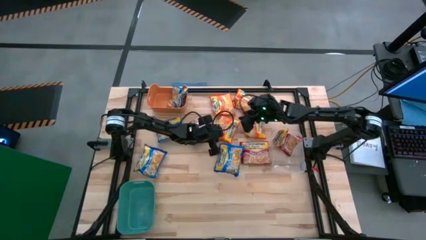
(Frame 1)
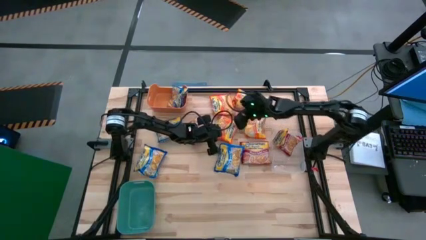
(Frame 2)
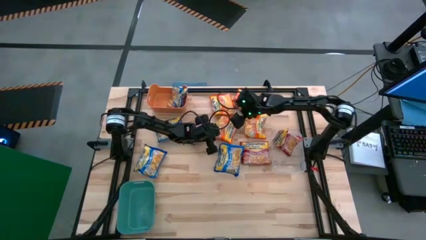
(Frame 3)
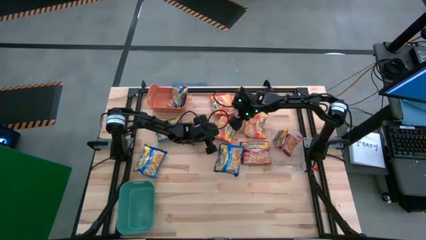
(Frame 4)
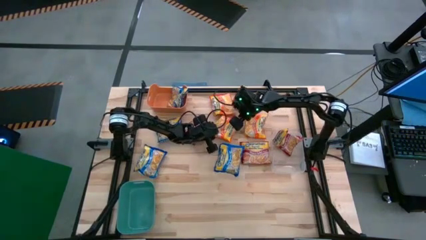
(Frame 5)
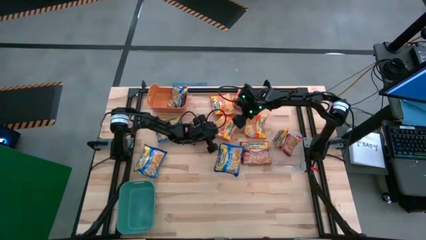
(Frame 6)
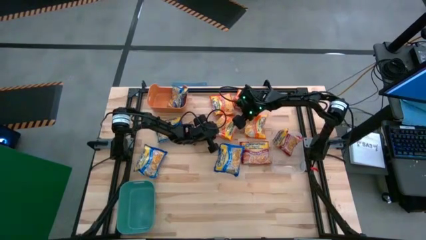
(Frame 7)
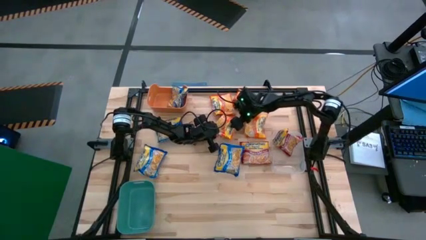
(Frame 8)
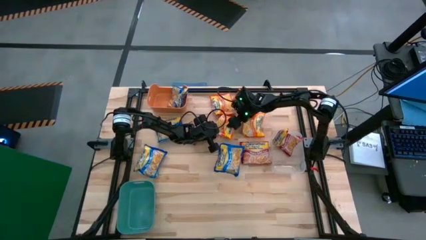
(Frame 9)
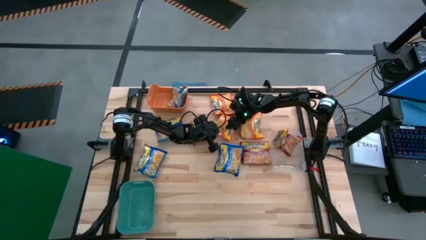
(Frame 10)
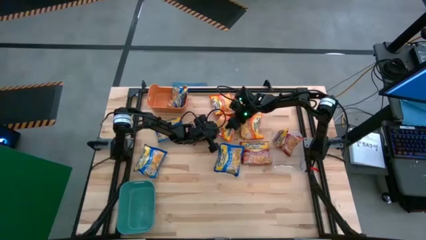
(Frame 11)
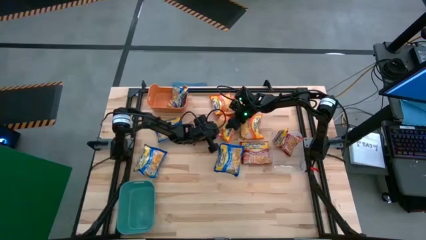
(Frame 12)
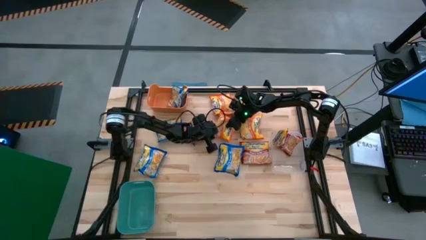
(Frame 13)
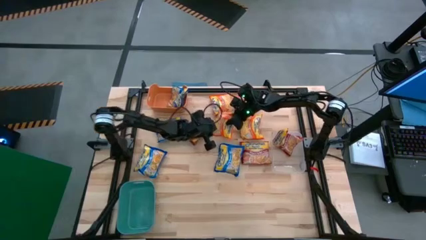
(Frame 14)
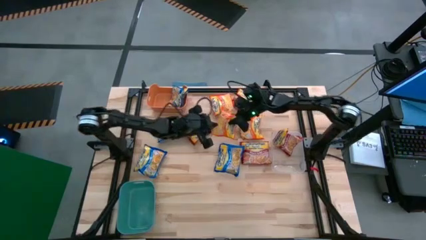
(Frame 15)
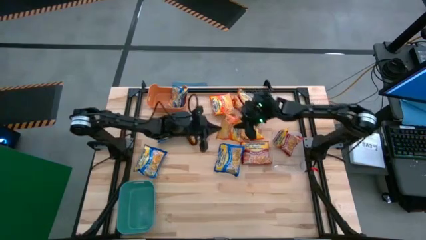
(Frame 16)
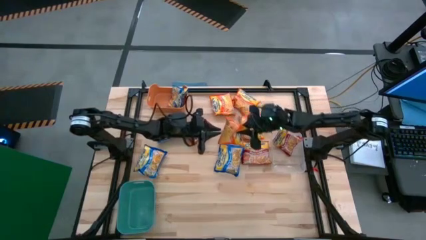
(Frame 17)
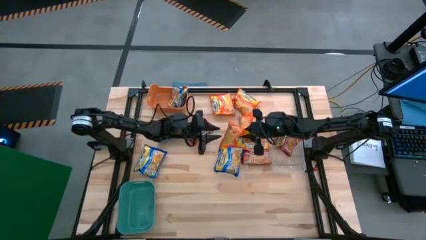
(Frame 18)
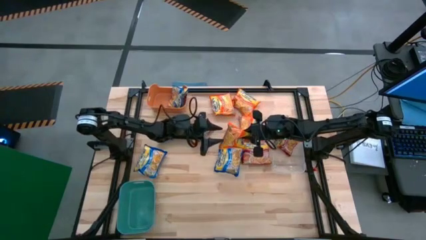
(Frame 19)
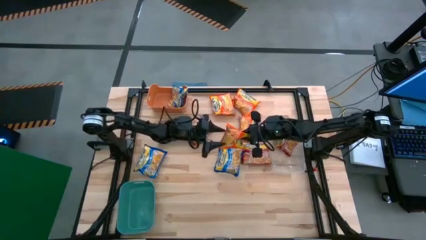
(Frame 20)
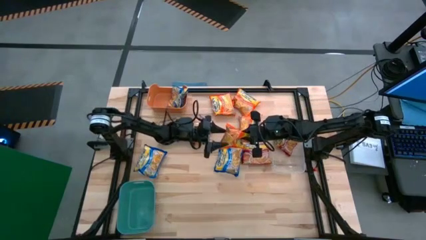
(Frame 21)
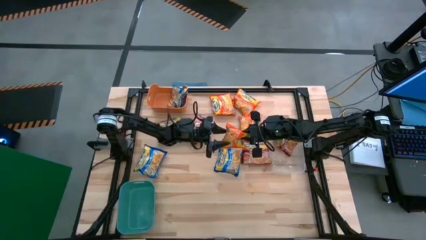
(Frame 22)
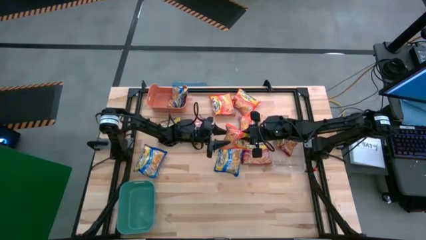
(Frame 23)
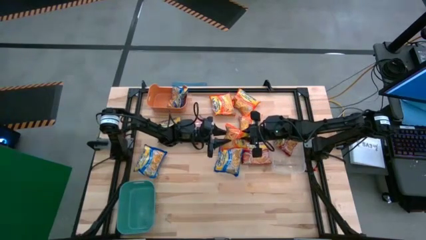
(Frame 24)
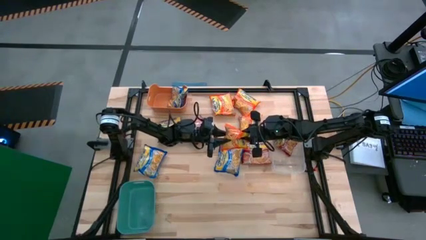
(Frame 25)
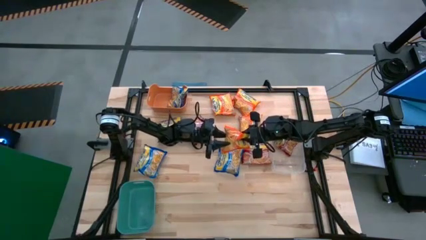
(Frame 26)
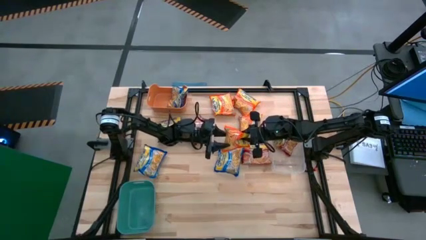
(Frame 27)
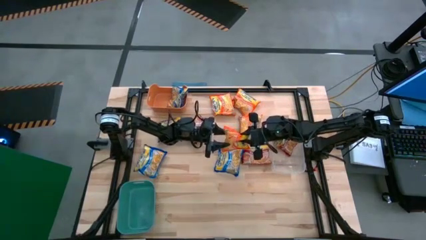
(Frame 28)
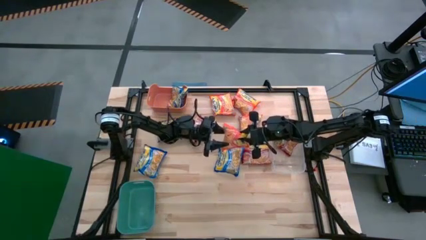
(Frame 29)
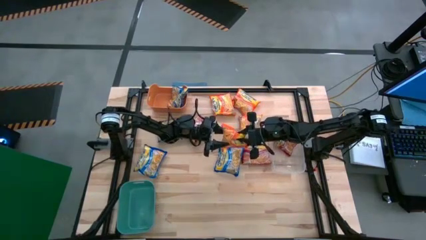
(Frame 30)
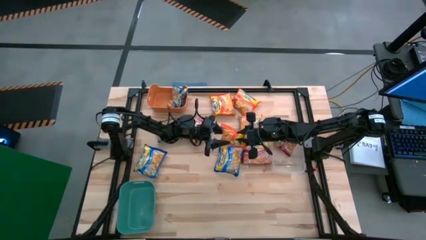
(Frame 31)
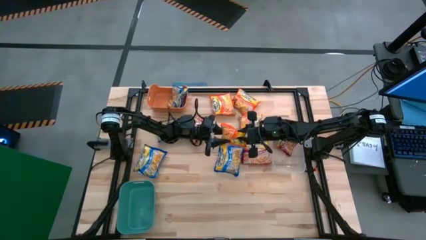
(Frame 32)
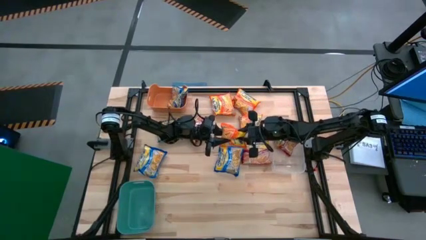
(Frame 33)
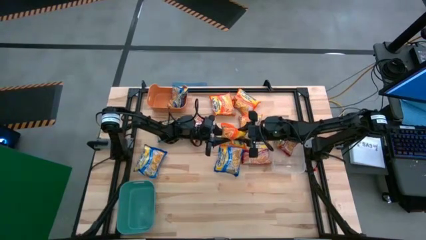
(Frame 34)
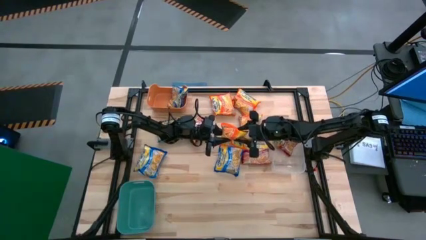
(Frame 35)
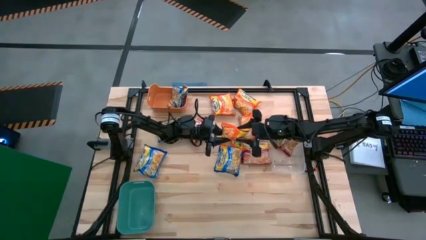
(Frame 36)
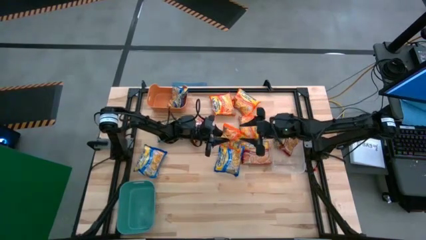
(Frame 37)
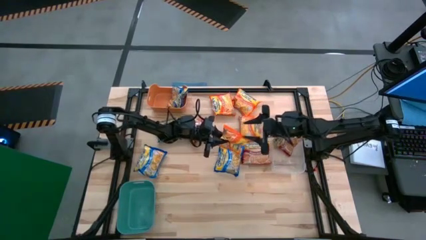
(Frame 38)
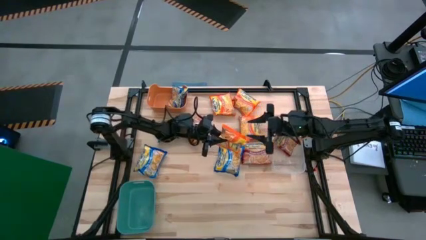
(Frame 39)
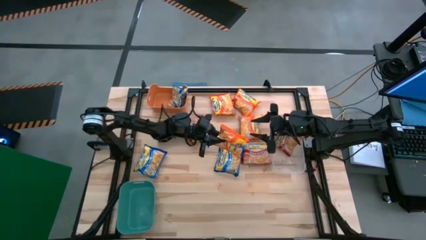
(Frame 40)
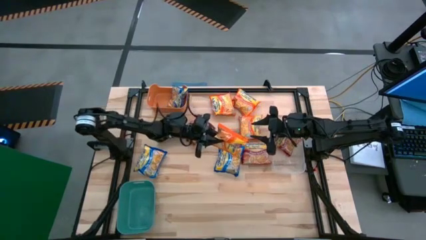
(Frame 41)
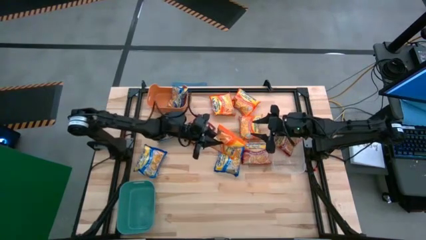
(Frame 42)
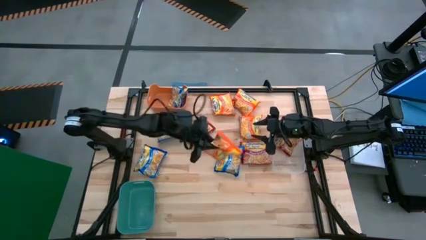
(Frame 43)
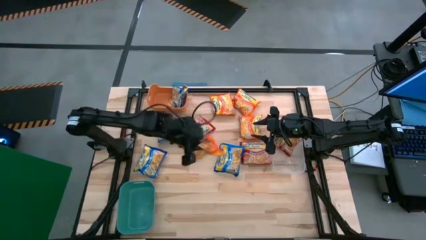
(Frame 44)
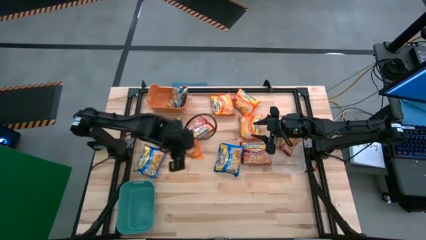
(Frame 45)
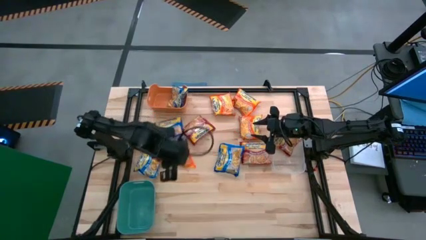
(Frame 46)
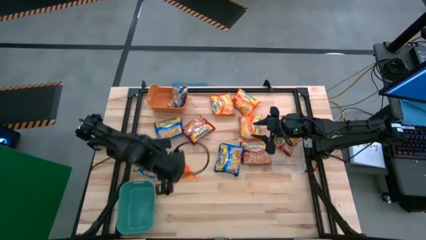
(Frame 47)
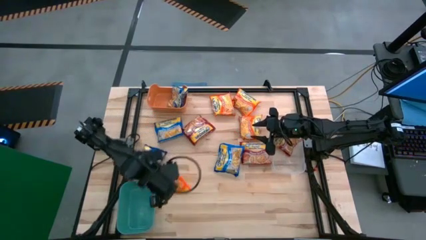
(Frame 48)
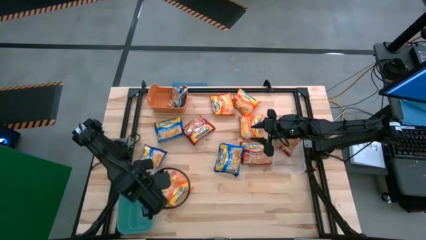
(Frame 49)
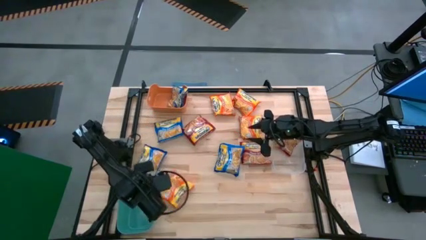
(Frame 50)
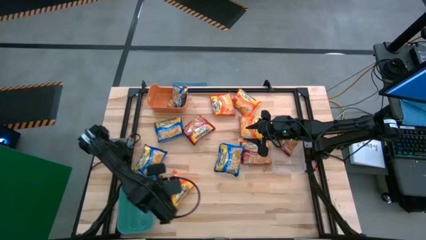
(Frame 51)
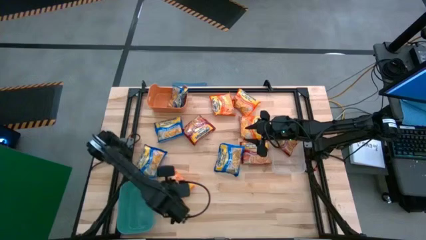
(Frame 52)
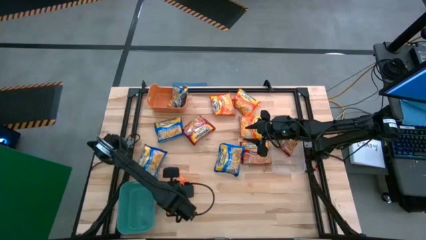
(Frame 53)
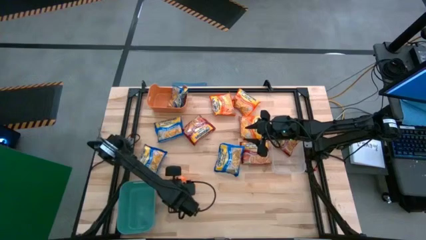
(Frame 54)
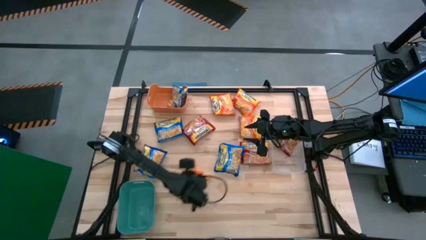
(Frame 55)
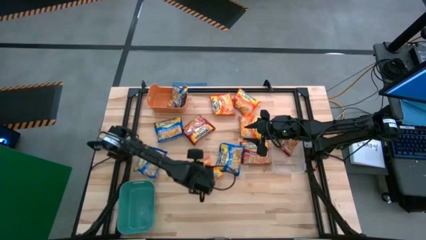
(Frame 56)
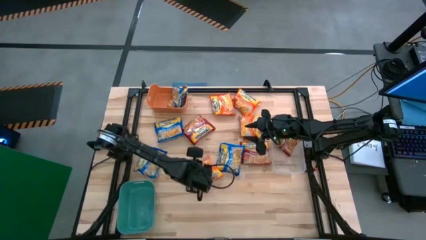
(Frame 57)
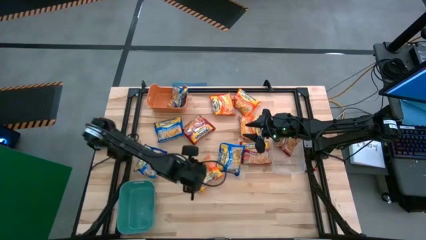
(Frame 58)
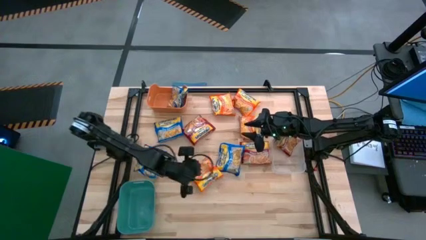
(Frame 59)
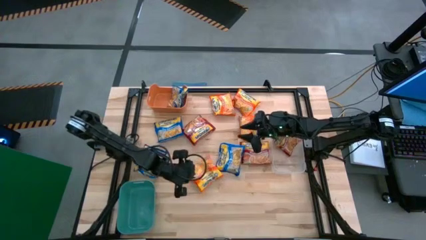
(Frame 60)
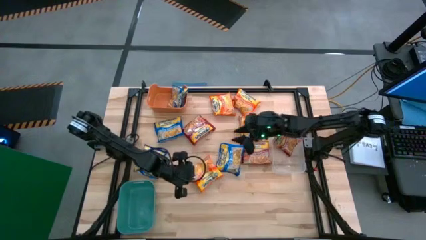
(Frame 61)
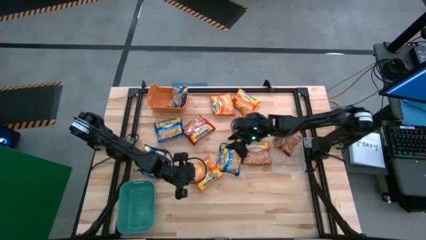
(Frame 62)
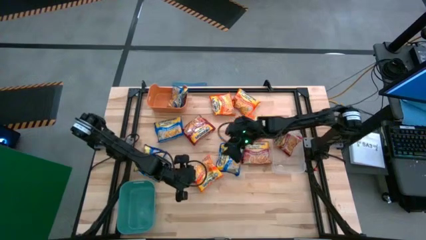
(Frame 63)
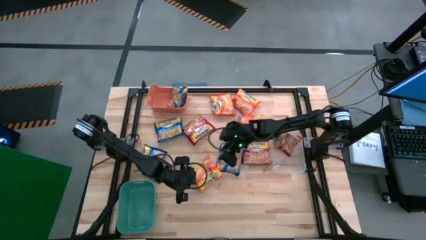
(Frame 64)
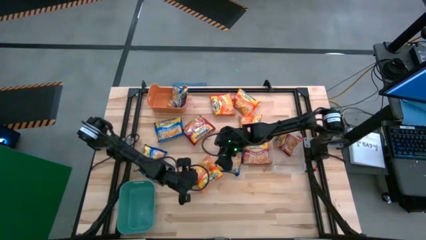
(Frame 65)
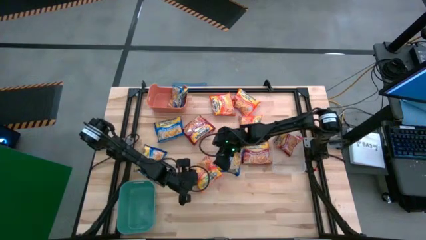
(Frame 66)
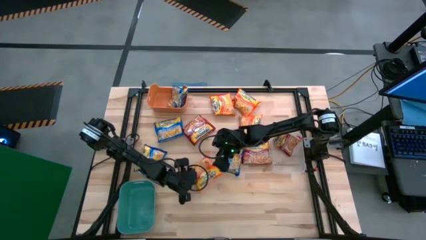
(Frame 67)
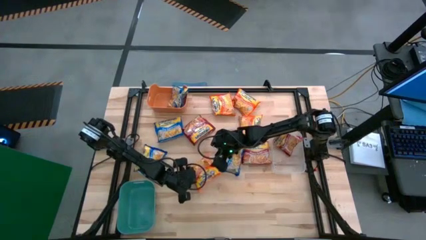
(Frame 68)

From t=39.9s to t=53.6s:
Task: Sort Maruchan noodles
Put the orange noodle pack into the green bin

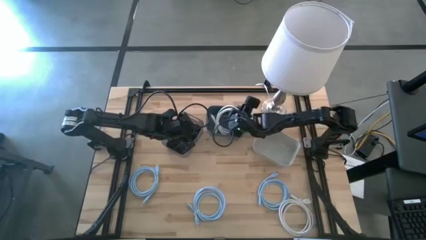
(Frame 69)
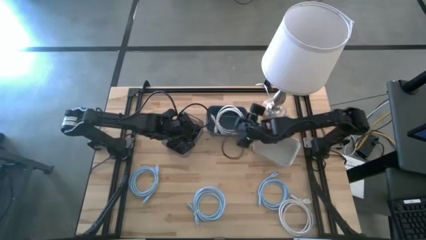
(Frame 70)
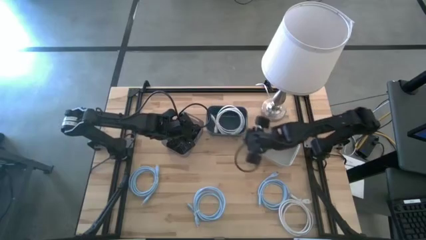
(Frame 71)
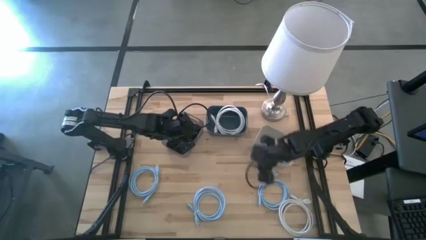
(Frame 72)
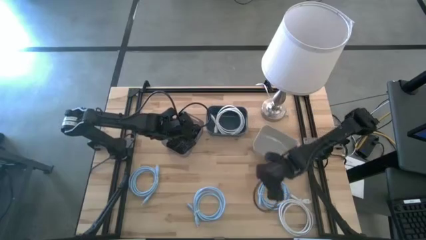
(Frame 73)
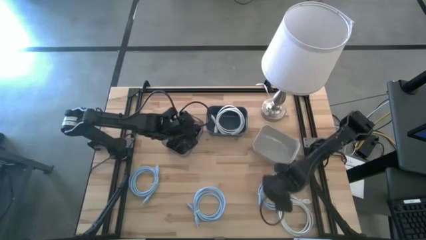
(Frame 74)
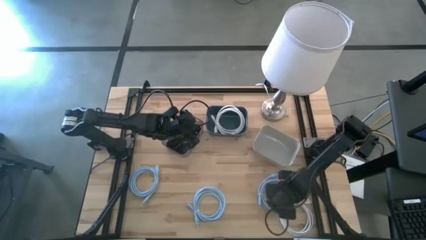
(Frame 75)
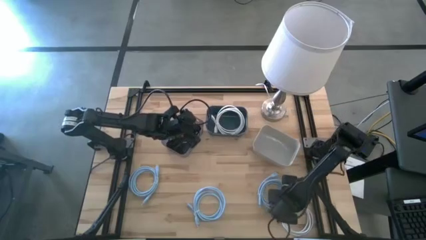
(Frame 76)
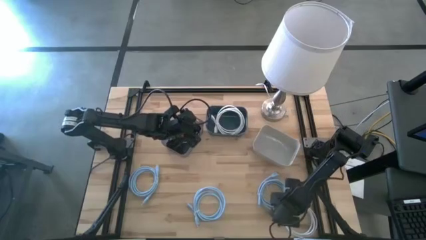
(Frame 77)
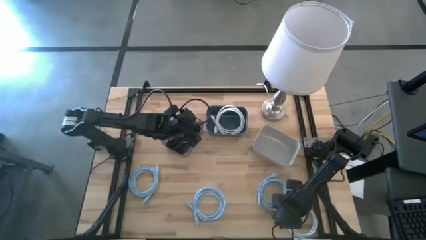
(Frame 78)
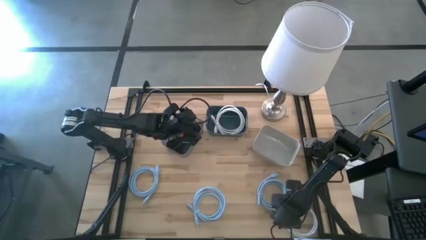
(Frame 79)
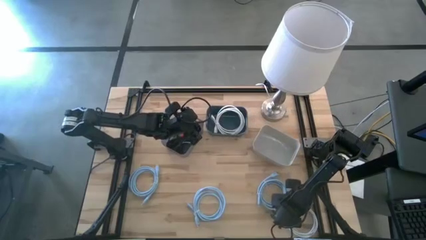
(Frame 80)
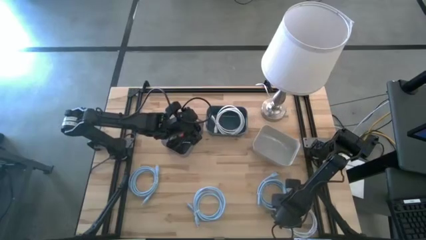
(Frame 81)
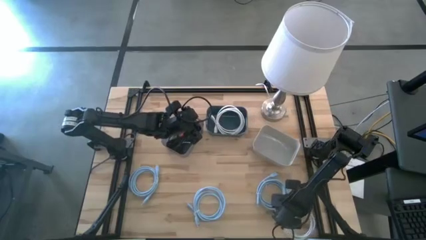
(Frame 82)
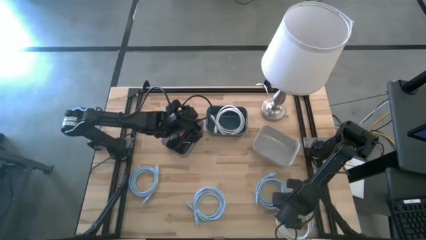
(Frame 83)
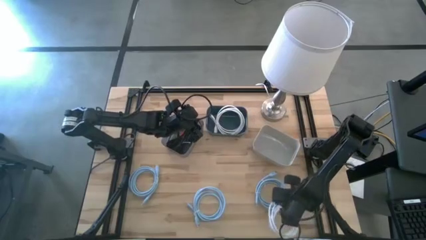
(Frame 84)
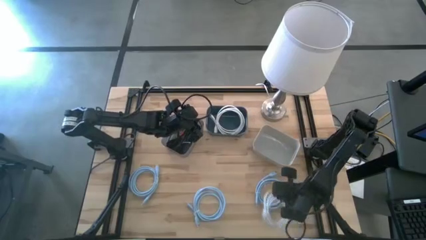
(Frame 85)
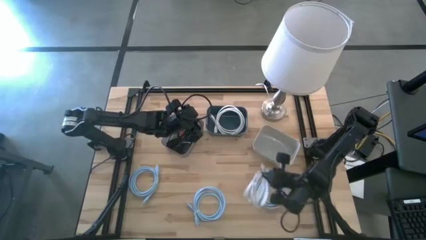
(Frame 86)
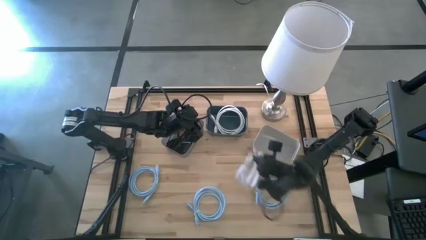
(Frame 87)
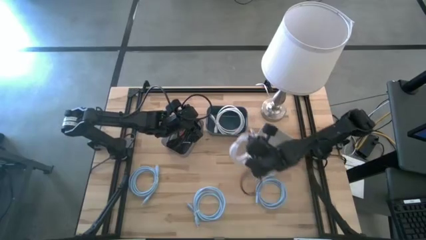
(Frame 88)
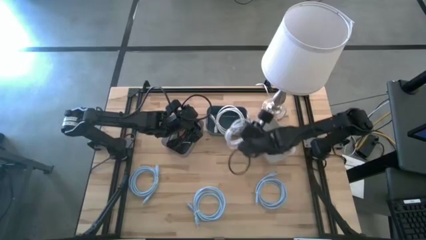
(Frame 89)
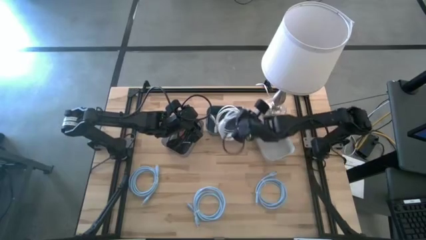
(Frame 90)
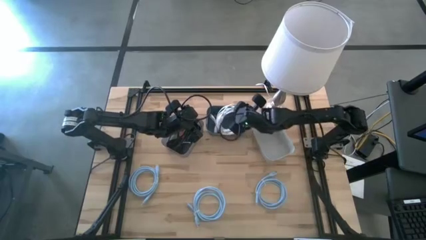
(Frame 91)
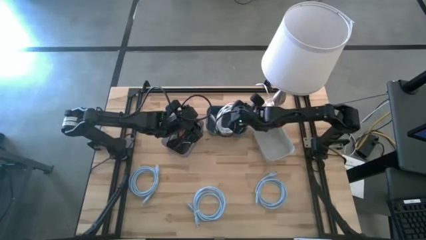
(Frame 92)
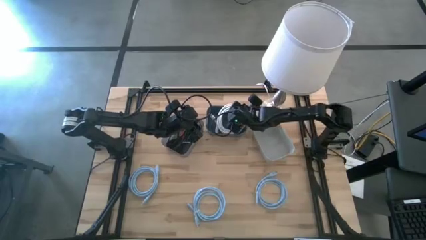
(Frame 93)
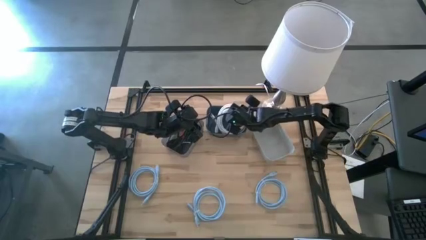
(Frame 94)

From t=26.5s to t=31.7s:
Task: Sort HDMI cables
Put the white HDMI cable into the blue bin
